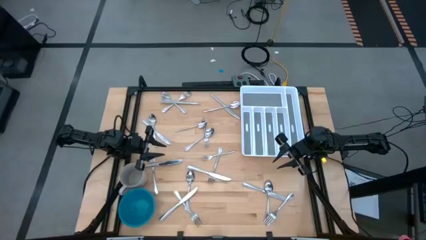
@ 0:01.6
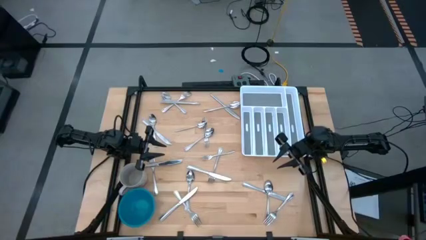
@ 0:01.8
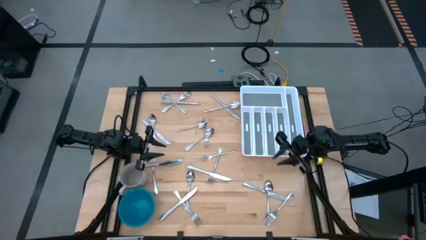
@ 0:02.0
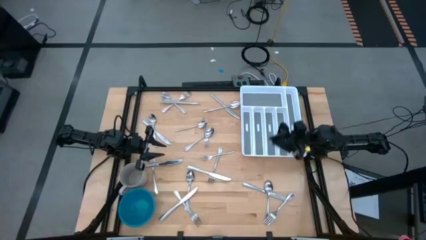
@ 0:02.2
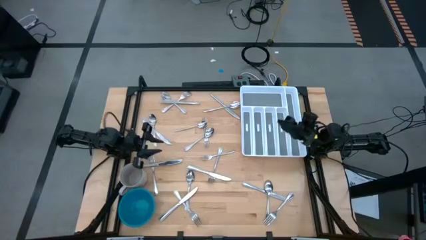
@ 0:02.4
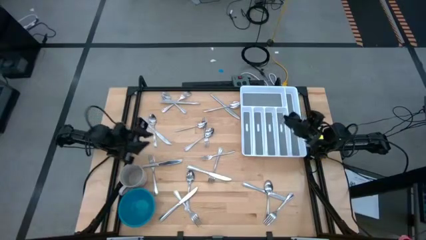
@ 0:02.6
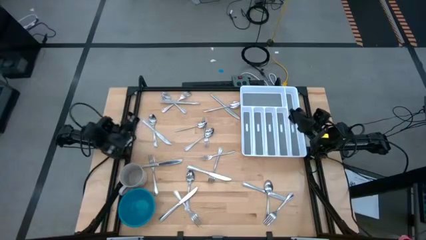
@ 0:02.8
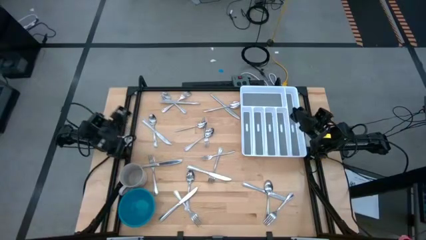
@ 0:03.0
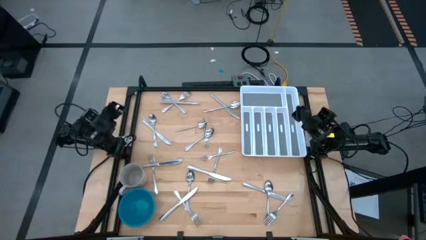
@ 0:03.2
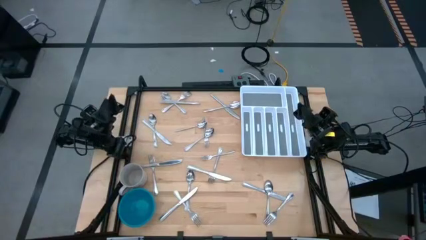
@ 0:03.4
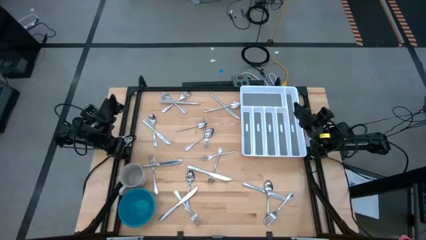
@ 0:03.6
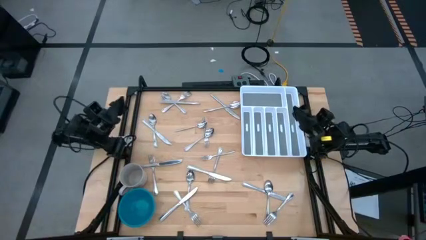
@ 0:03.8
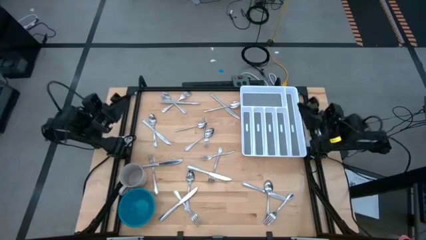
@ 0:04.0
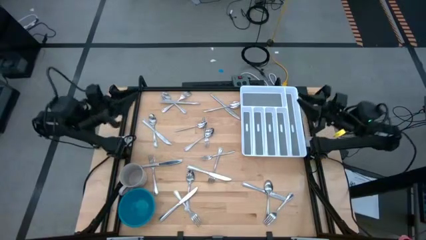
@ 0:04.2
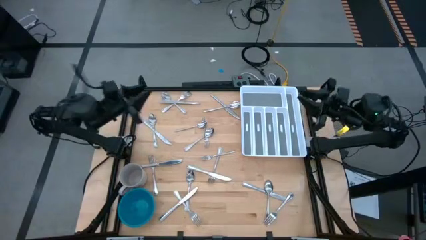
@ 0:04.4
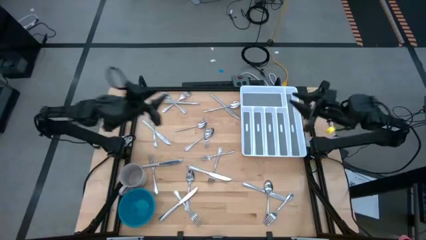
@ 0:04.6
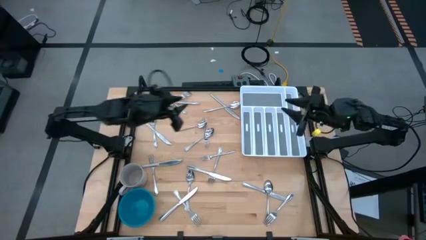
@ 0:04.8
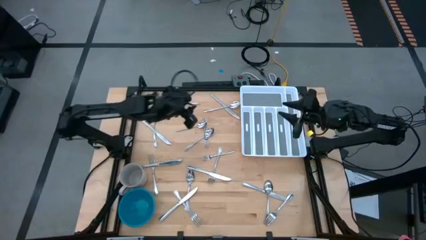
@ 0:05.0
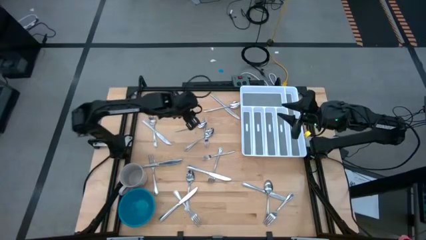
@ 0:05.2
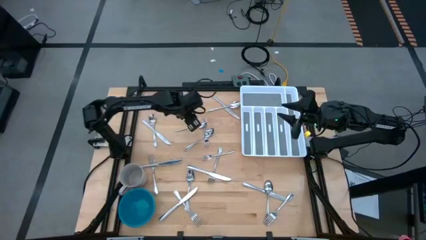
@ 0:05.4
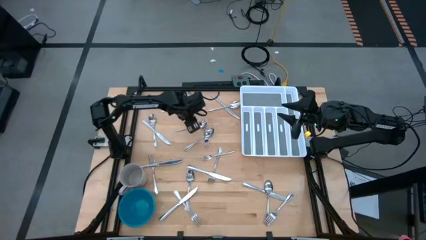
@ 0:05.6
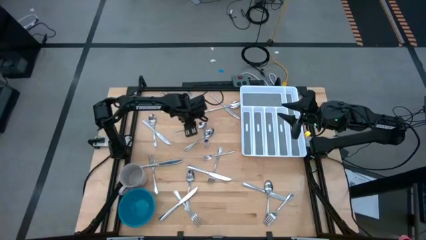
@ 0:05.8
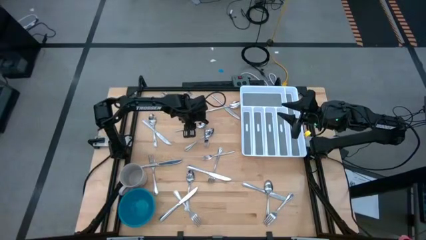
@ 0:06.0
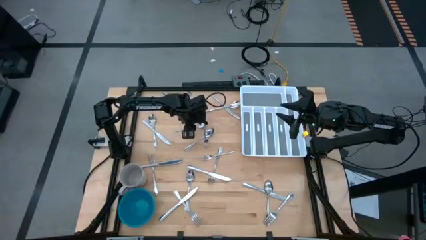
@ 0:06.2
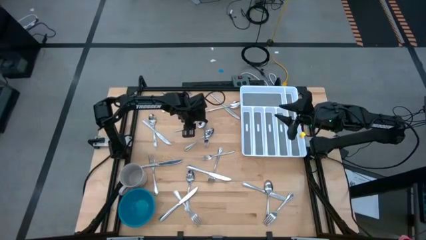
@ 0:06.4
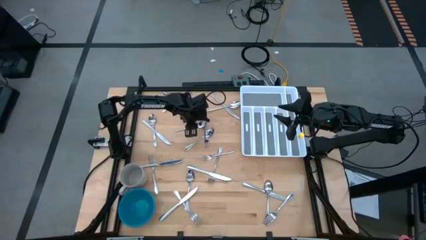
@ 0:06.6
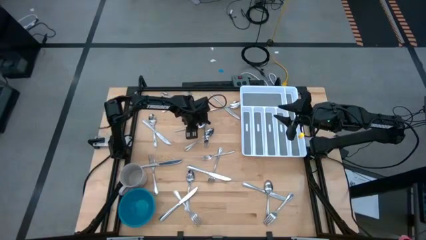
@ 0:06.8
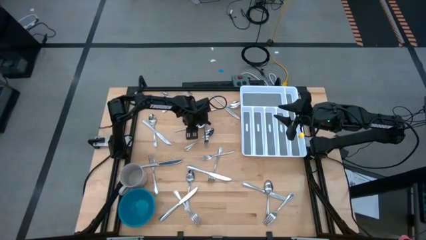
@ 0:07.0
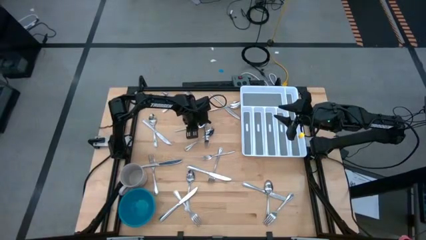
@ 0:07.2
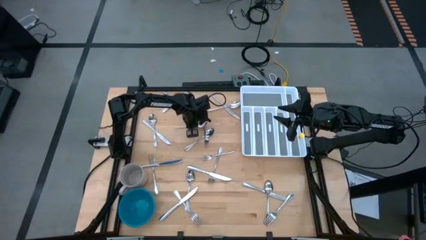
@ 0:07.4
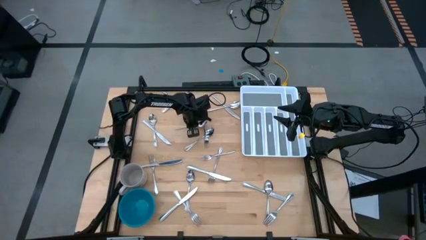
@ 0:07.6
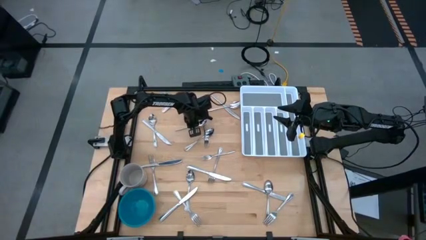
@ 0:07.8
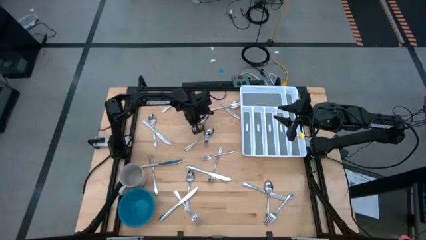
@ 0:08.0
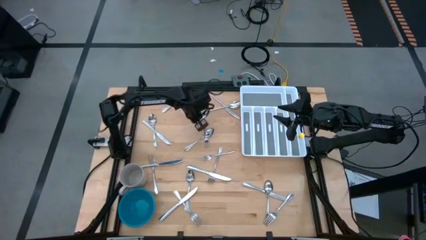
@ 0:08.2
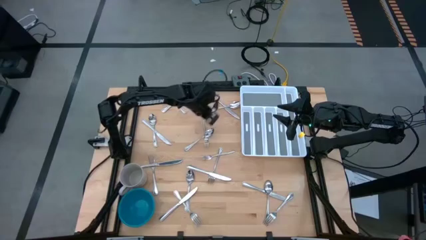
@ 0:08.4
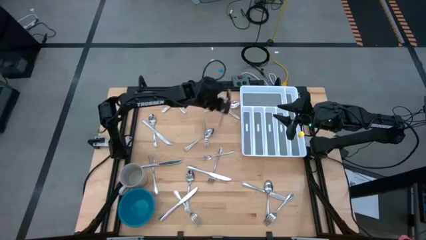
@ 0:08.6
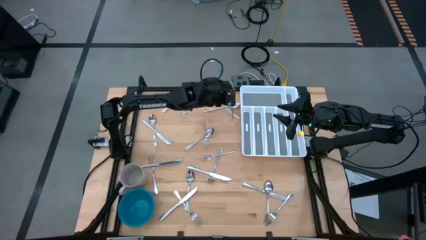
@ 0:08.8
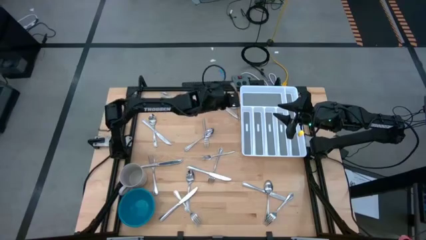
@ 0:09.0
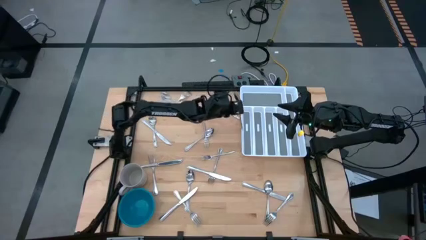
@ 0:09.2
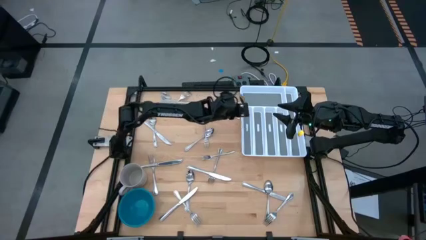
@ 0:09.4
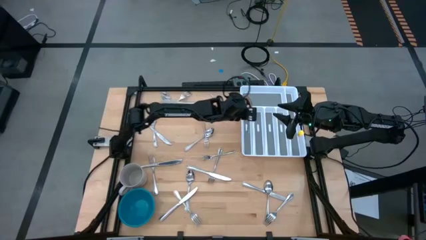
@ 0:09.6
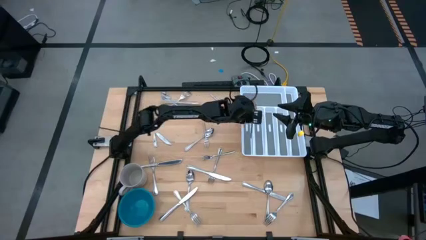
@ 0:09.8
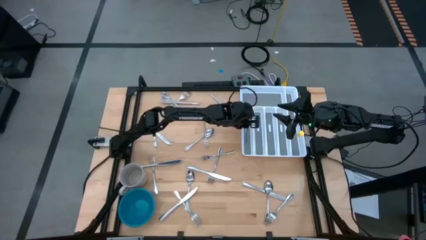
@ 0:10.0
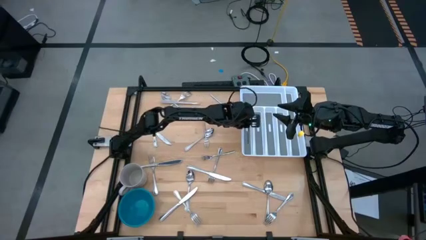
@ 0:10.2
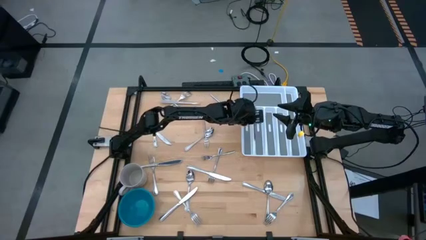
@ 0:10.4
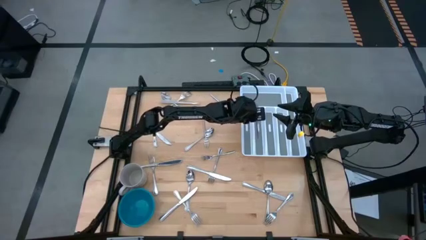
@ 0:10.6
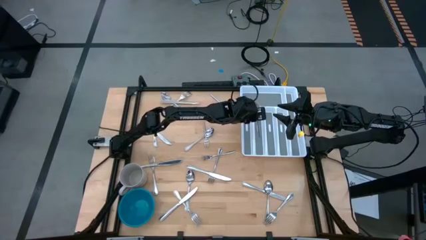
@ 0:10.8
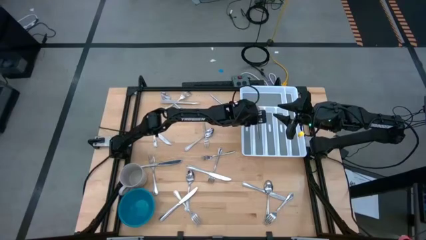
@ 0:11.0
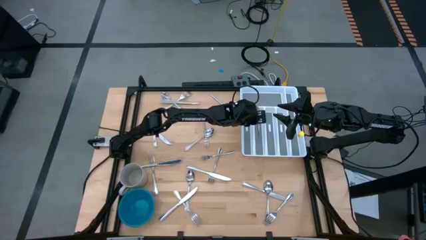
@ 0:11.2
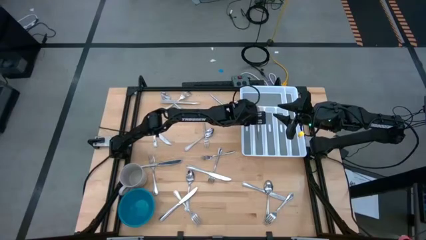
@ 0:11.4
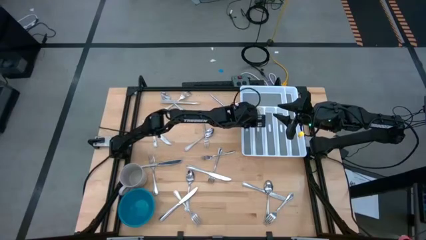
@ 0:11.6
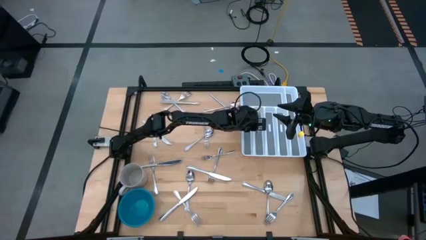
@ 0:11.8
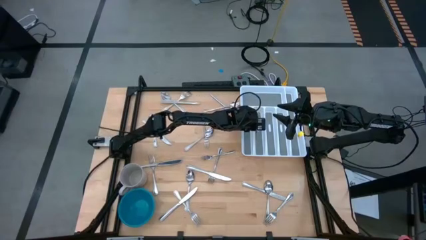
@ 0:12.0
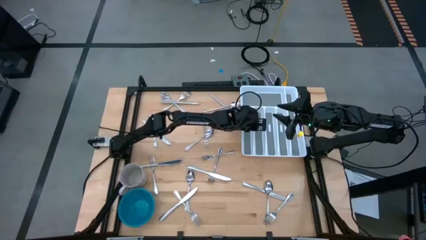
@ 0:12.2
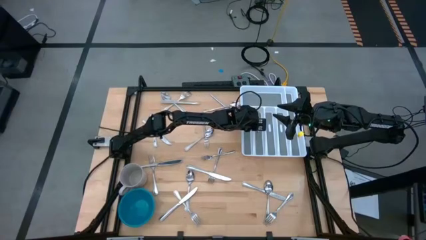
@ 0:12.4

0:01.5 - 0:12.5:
Task: Sort silverware
Put the spoon into the silverware tray
